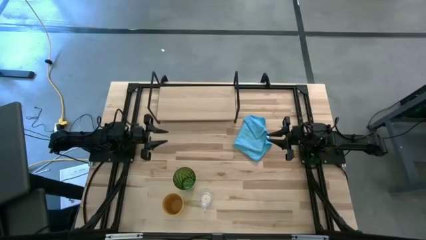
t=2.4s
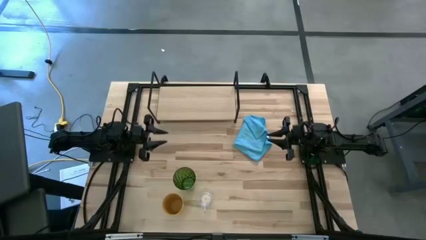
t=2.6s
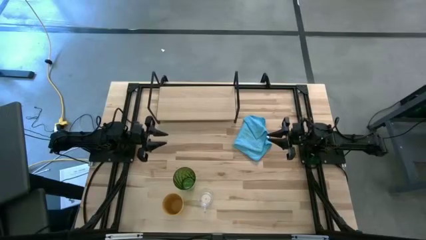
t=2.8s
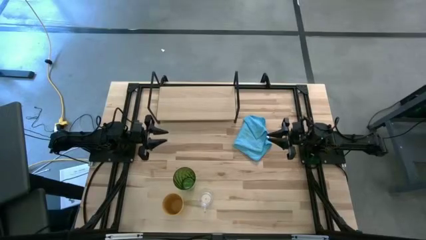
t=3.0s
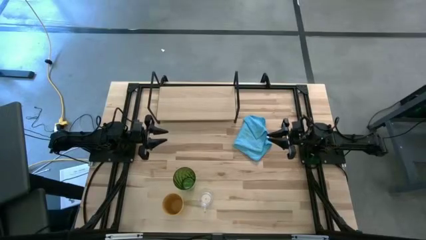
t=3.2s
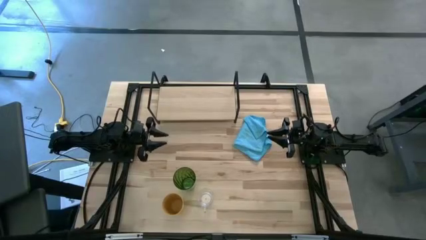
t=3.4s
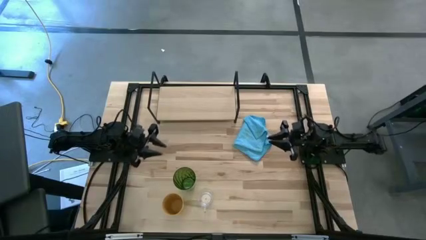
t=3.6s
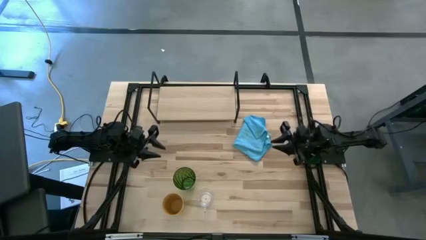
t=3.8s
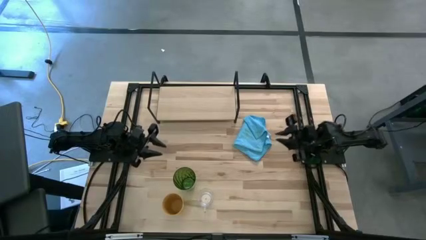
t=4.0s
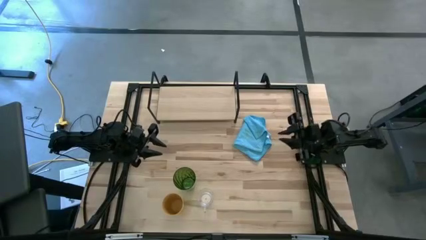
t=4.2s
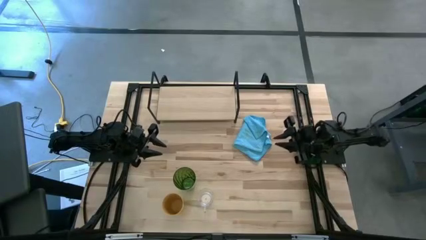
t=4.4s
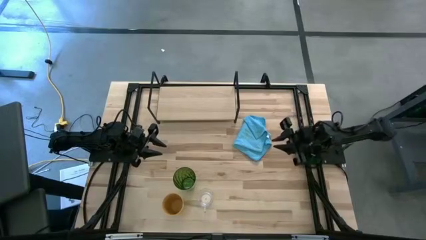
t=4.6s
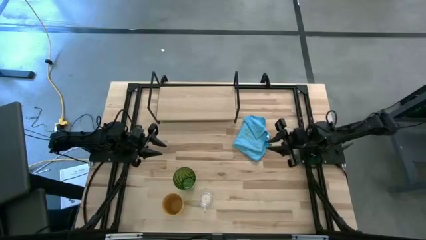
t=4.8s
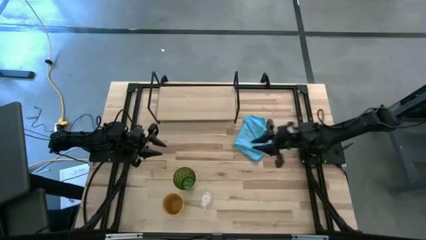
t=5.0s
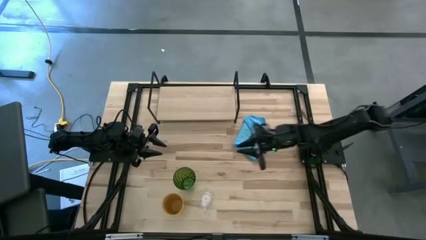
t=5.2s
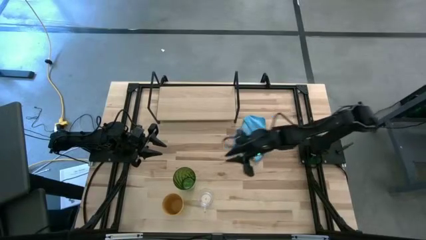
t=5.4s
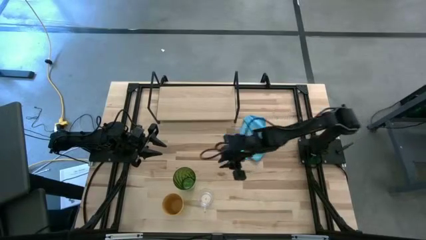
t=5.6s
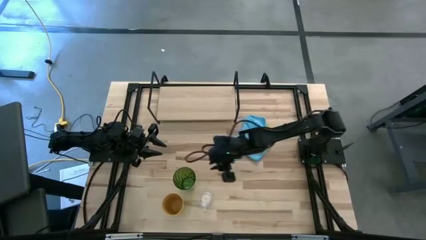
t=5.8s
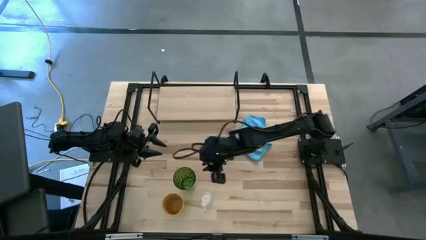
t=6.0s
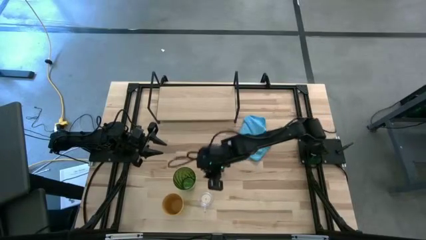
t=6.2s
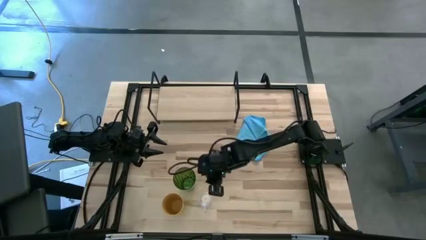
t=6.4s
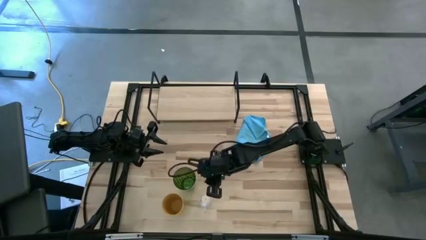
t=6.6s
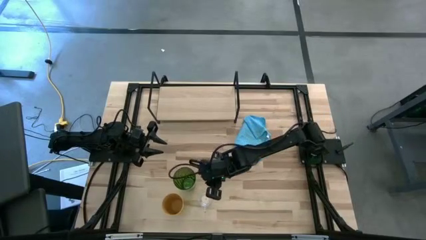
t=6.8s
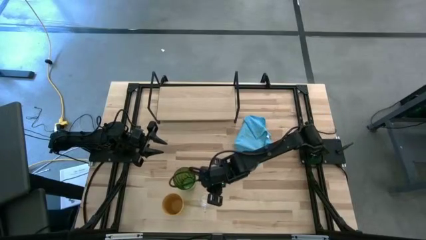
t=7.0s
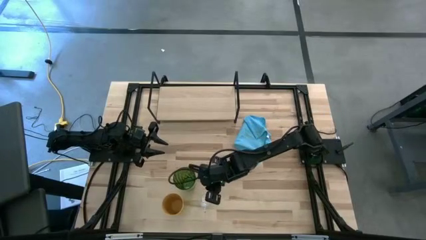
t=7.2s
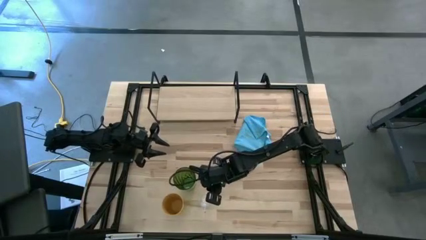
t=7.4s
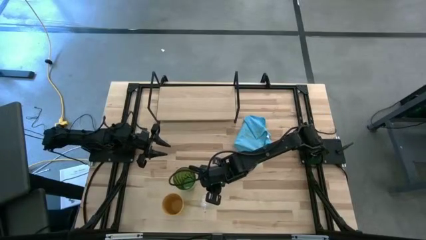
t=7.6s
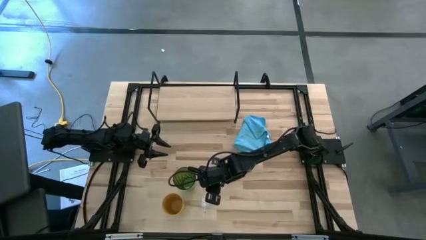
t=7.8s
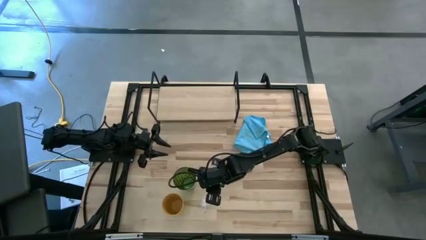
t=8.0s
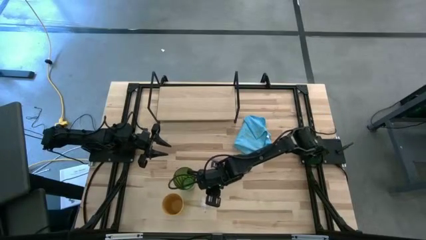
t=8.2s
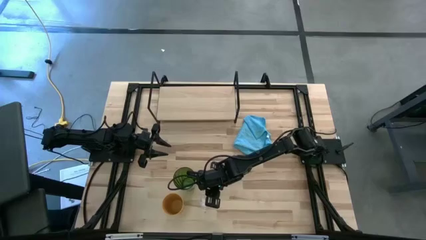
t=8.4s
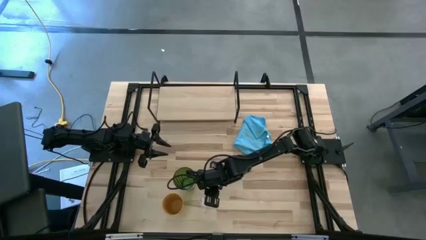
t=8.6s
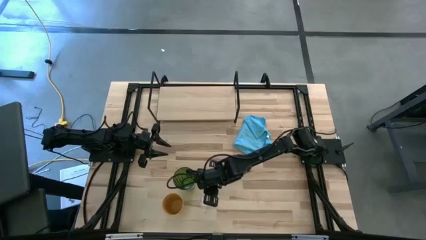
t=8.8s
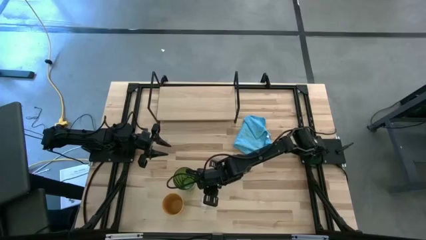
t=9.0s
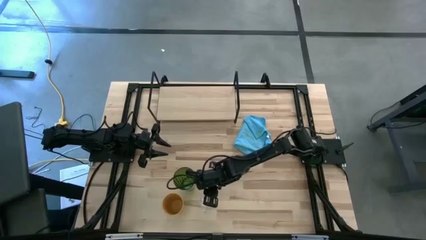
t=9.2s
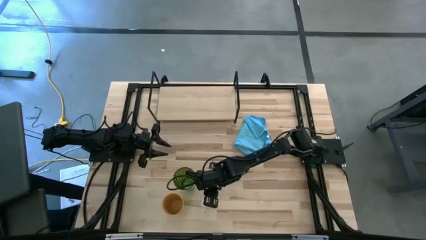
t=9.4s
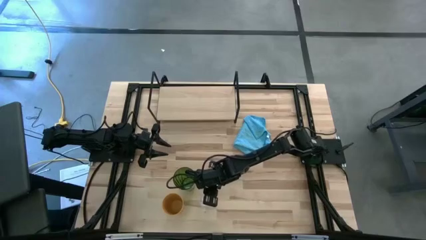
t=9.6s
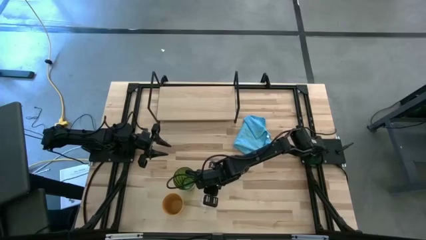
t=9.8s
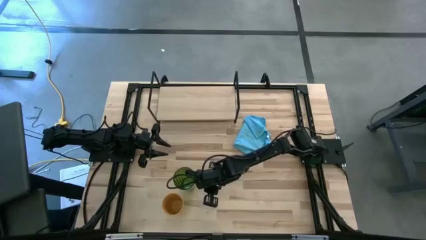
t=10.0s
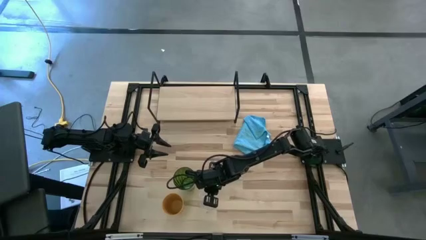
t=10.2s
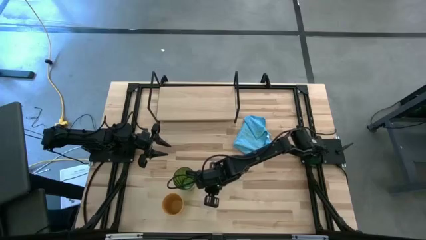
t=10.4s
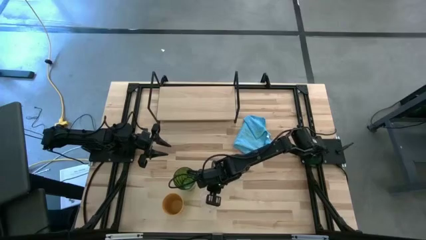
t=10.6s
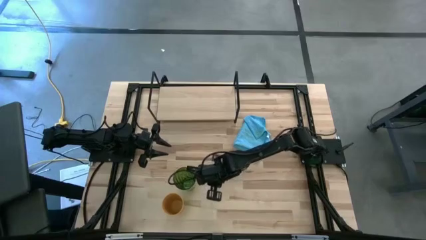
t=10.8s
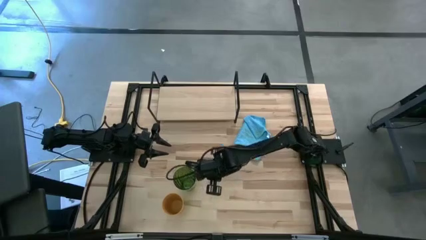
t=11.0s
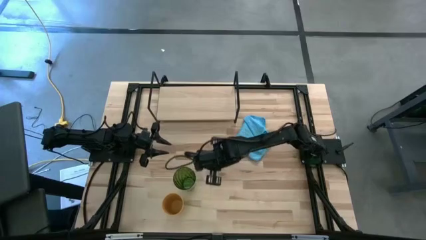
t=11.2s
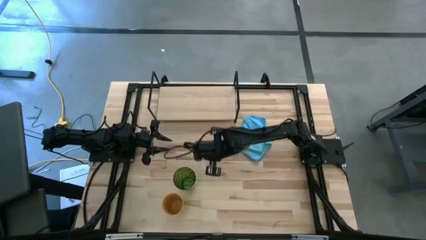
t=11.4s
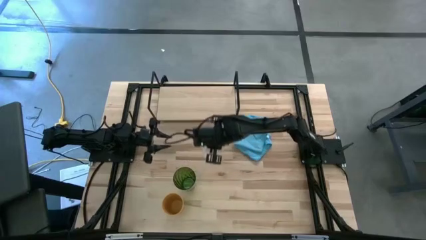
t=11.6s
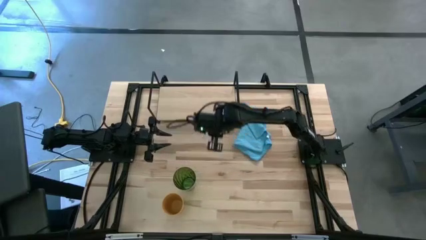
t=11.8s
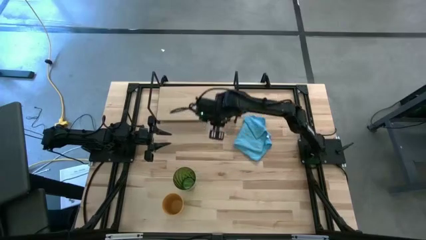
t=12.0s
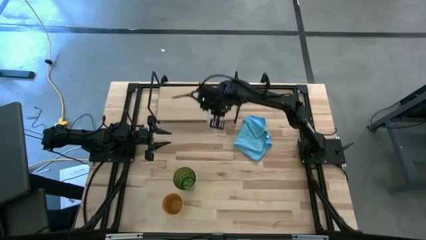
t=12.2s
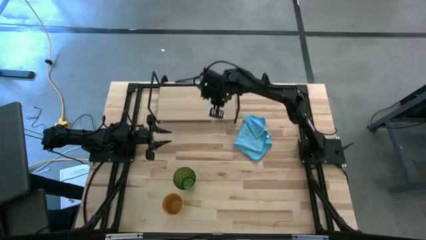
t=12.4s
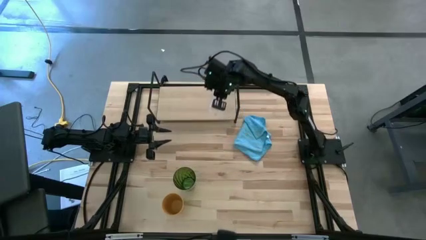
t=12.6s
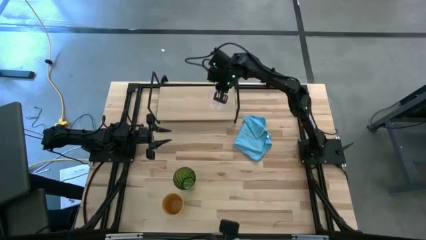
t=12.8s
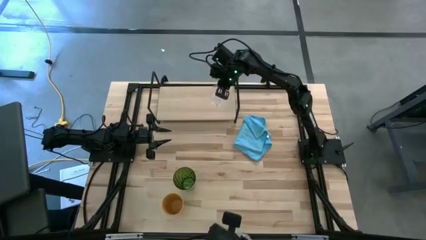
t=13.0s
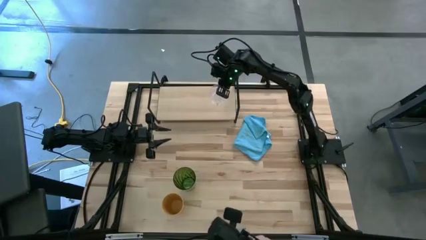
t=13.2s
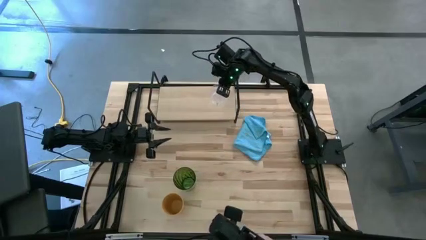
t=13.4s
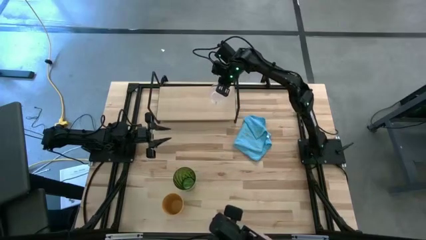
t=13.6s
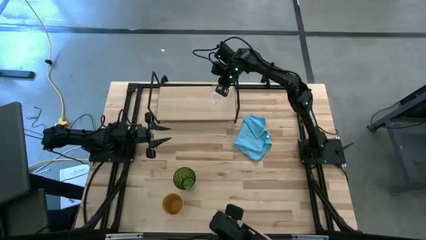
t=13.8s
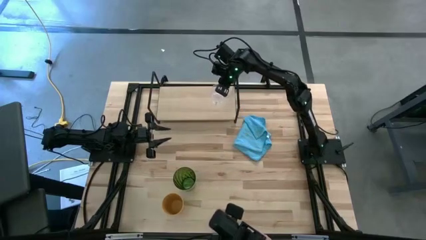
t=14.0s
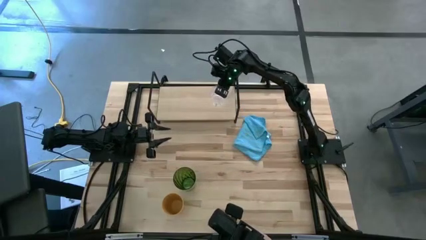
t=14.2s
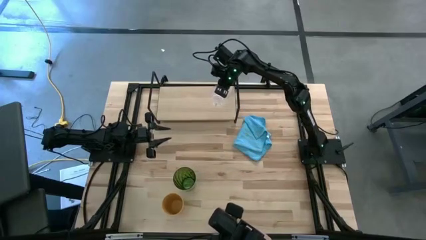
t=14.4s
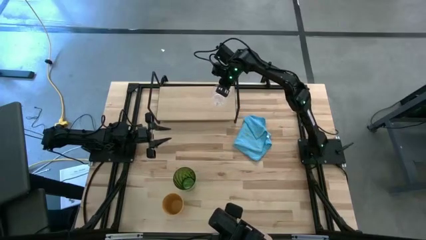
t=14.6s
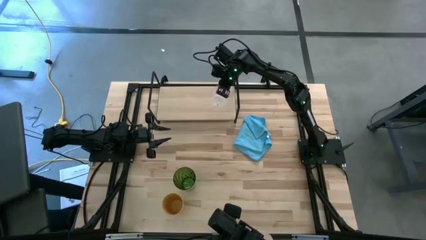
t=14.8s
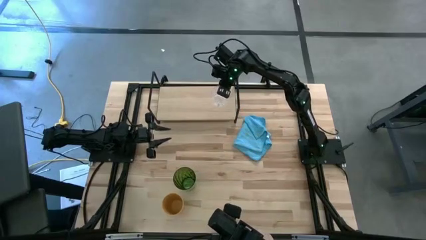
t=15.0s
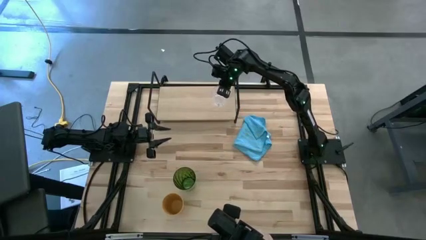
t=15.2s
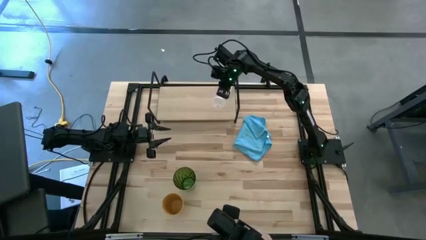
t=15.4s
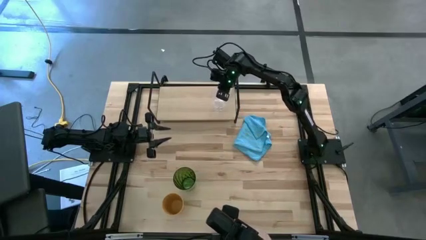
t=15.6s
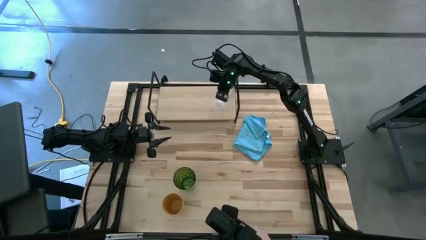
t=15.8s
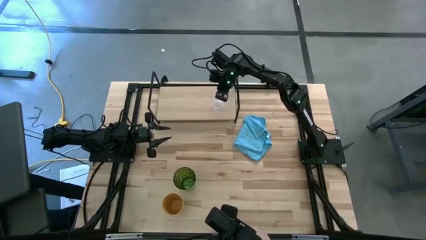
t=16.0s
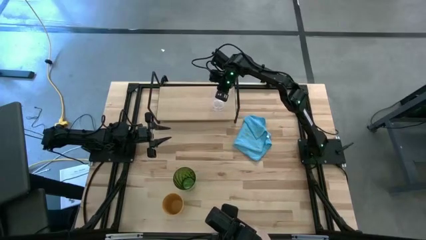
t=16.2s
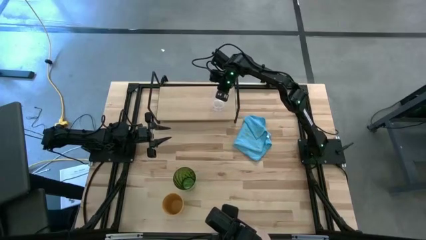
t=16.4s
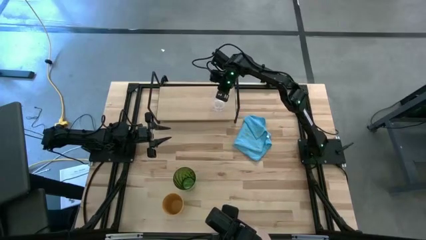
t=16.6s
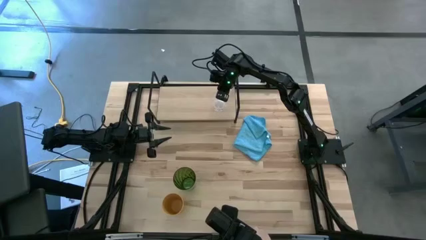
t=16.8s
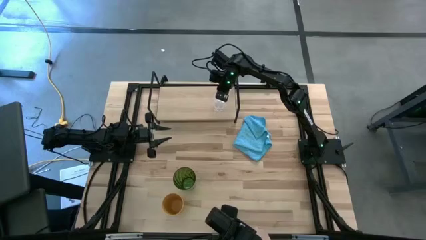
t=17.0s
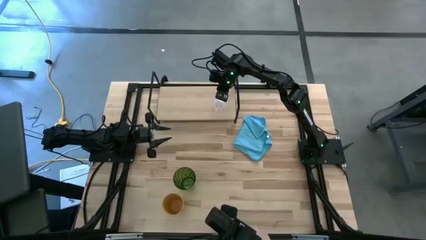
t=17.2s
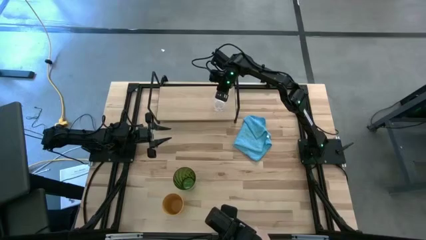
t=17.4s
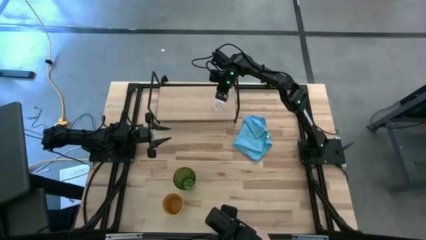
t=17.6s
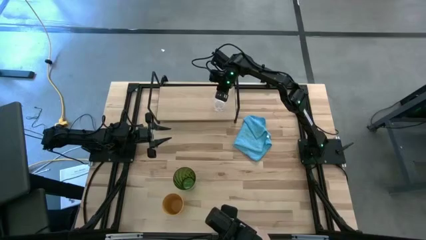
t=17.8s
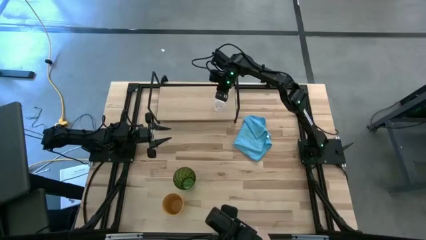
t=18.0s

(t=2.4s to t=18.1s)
Task: Stack small to large cups/mugs on shelf
Put the transparent mug on the shelf
